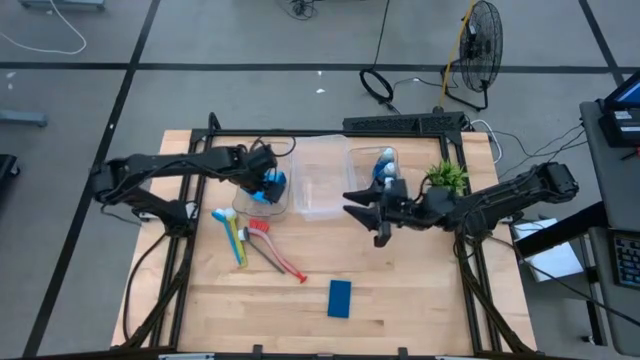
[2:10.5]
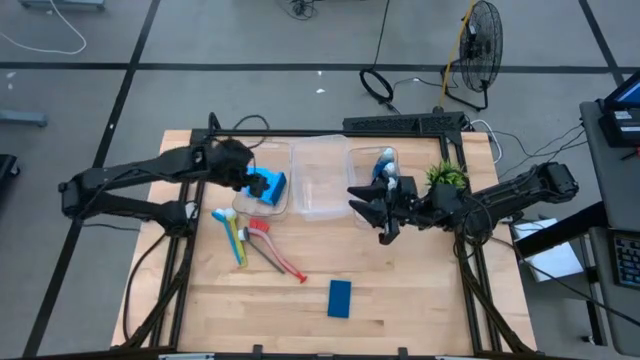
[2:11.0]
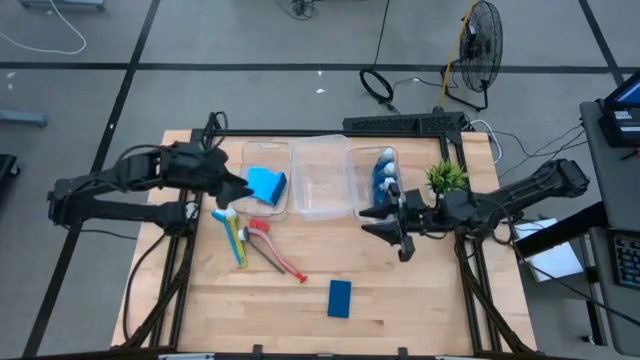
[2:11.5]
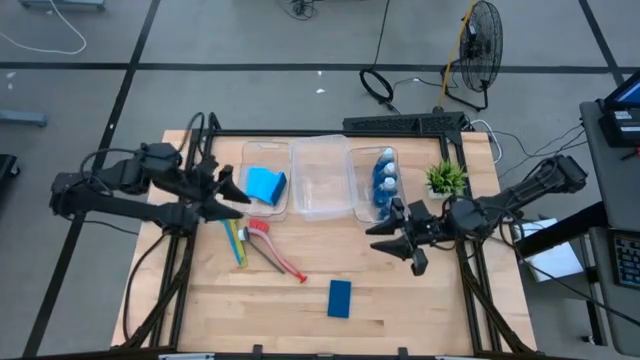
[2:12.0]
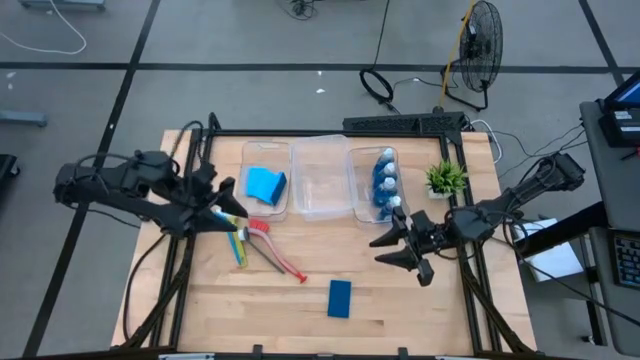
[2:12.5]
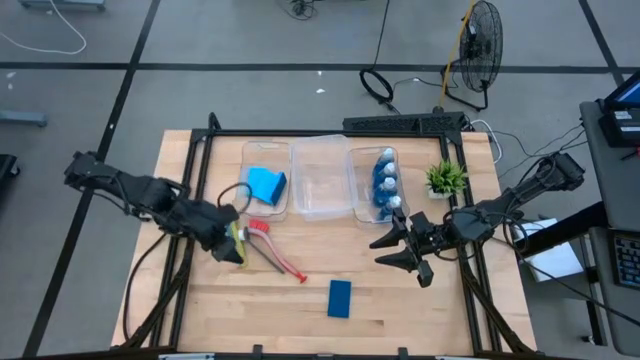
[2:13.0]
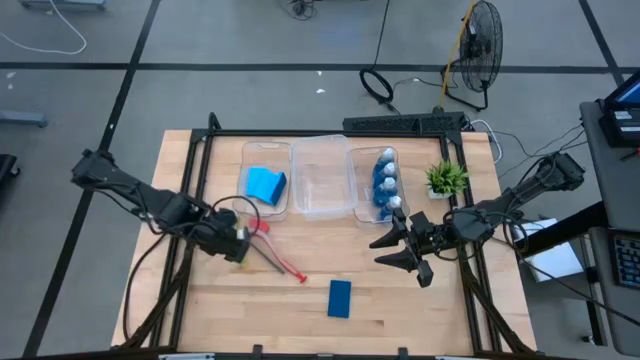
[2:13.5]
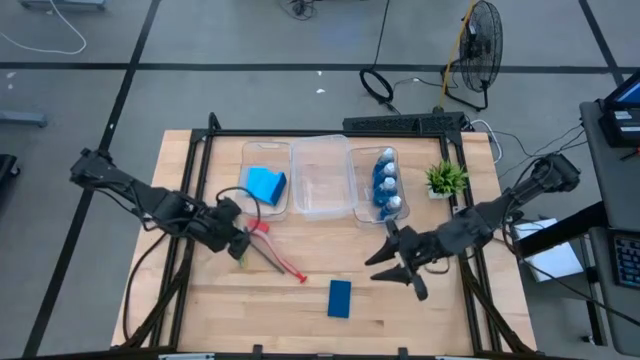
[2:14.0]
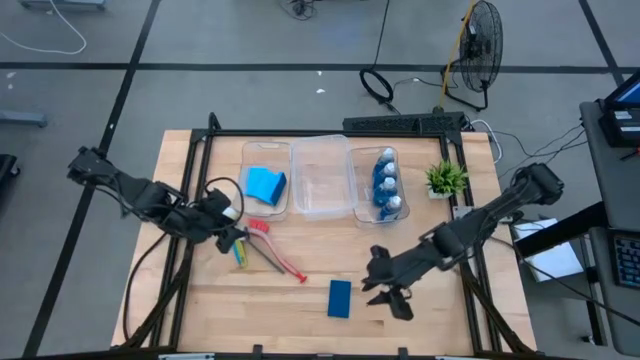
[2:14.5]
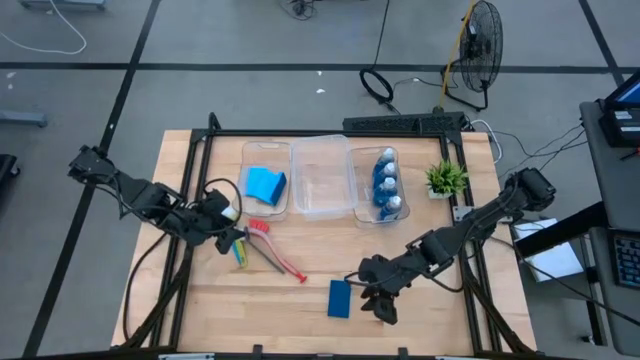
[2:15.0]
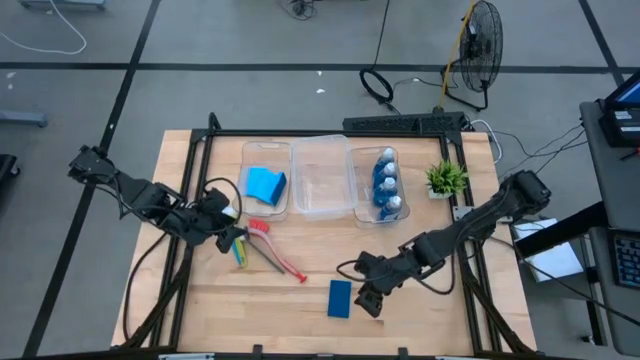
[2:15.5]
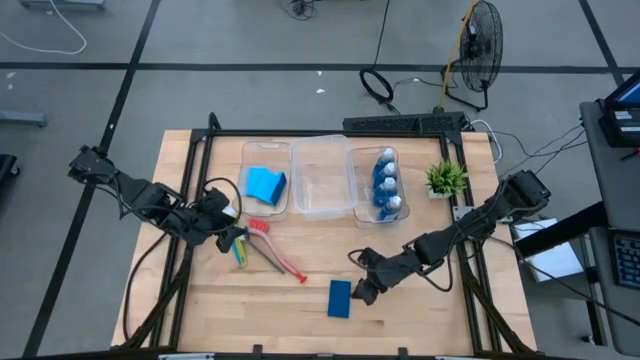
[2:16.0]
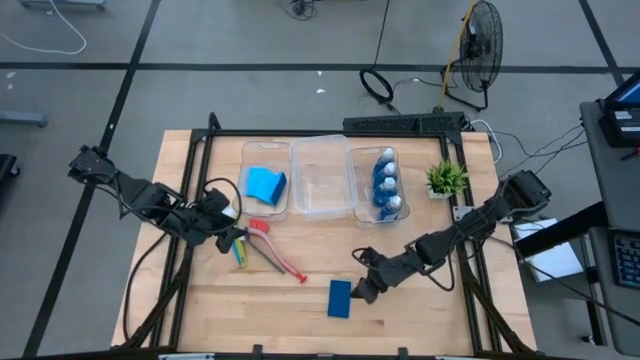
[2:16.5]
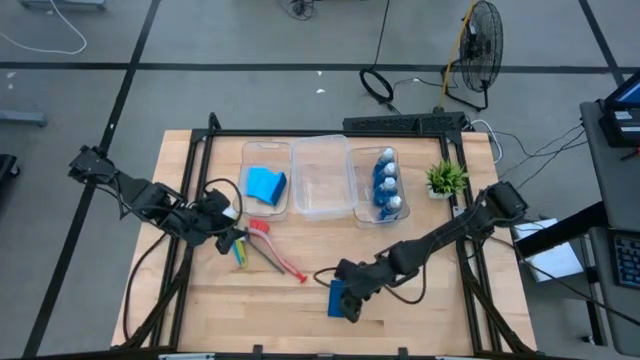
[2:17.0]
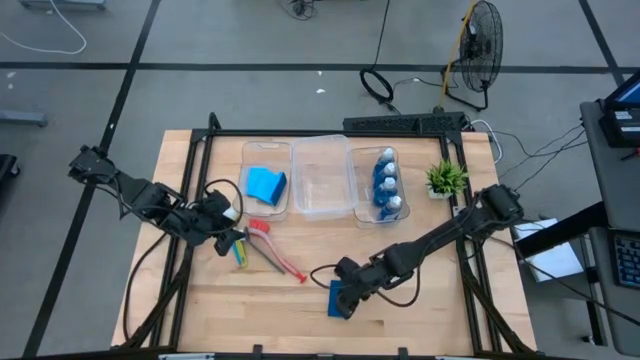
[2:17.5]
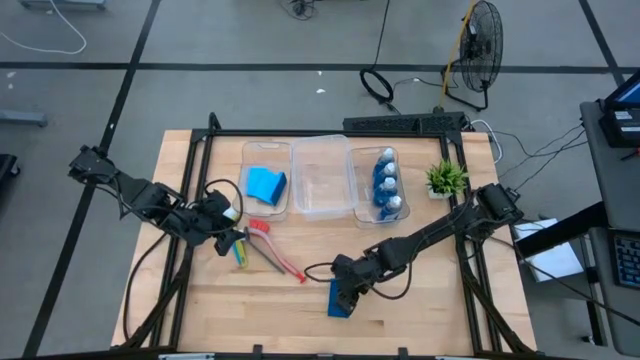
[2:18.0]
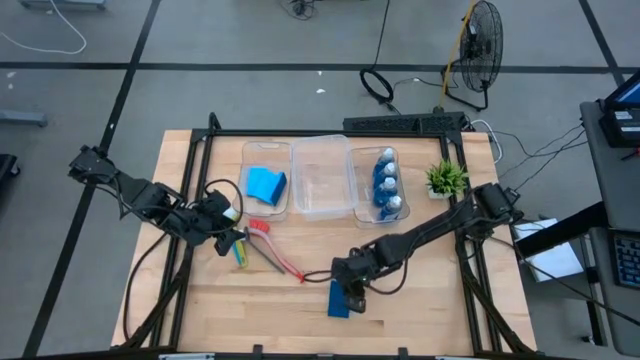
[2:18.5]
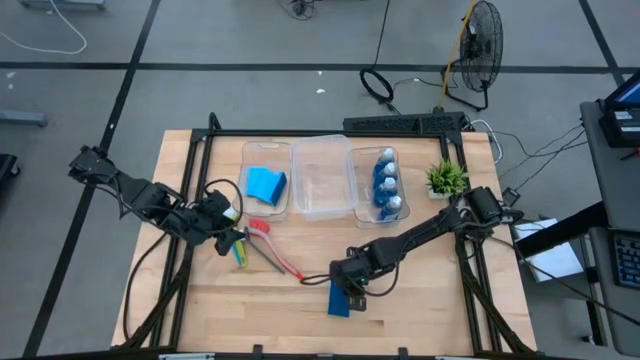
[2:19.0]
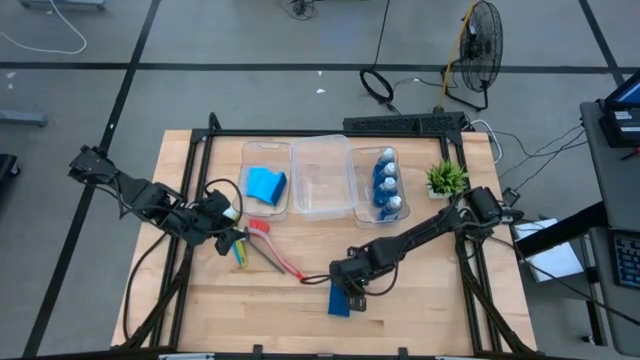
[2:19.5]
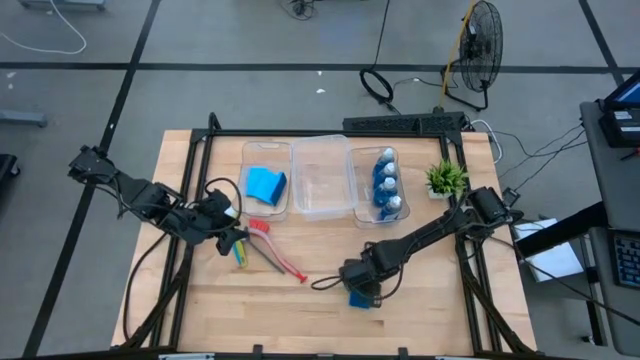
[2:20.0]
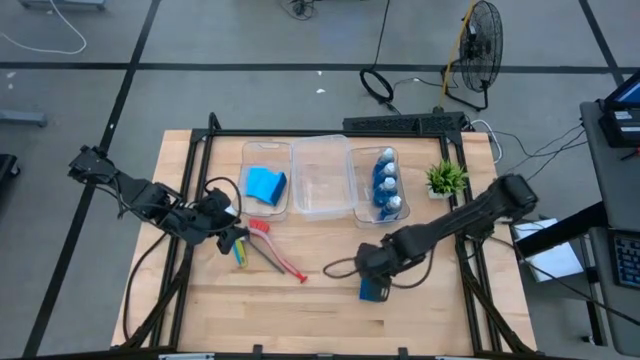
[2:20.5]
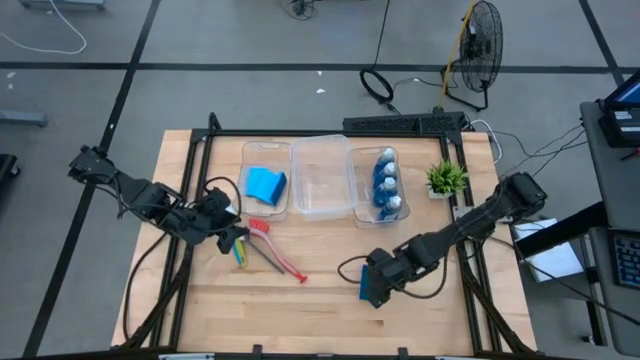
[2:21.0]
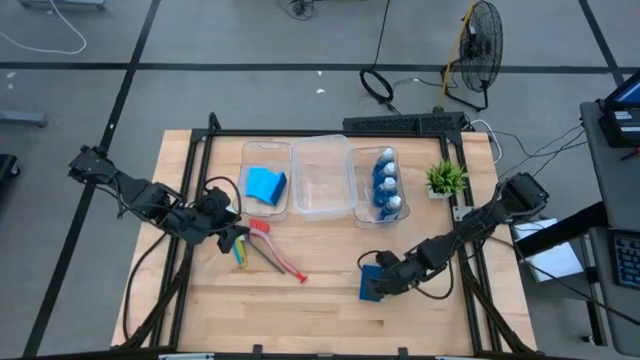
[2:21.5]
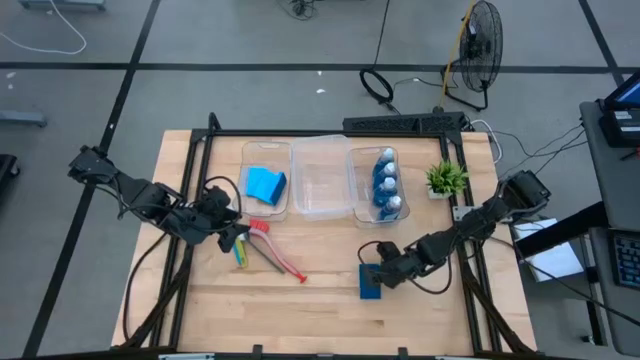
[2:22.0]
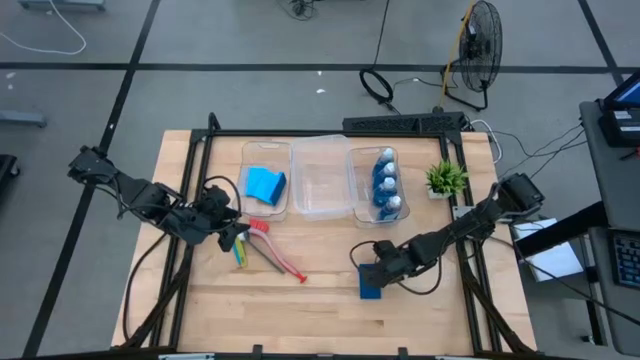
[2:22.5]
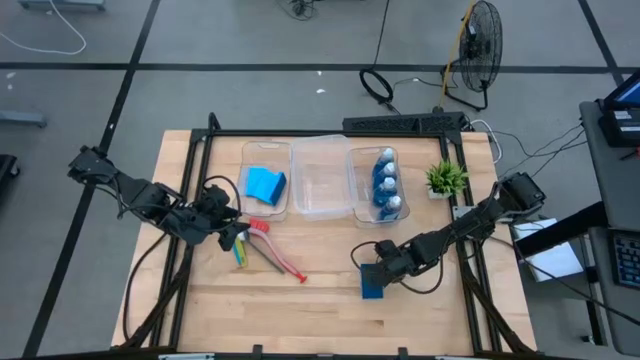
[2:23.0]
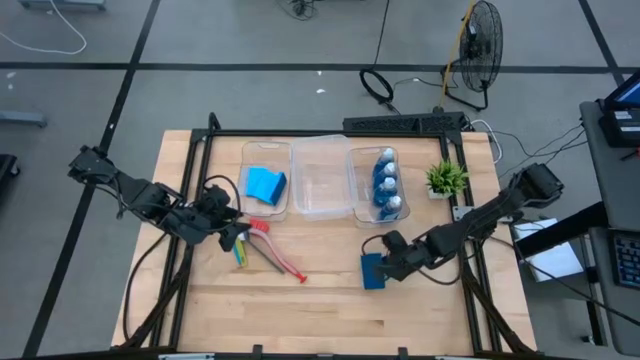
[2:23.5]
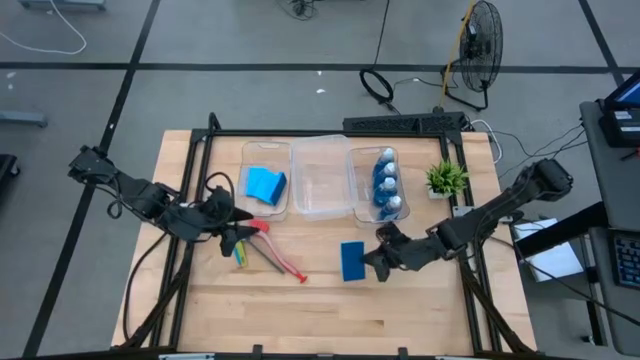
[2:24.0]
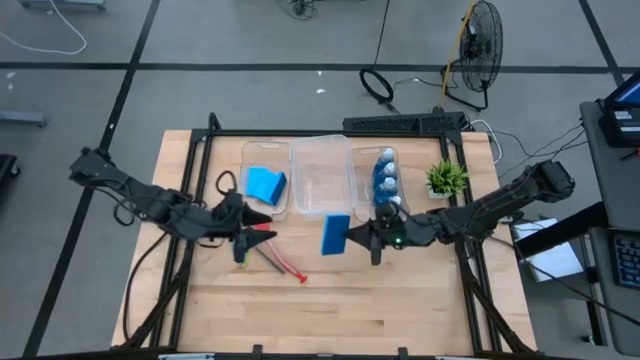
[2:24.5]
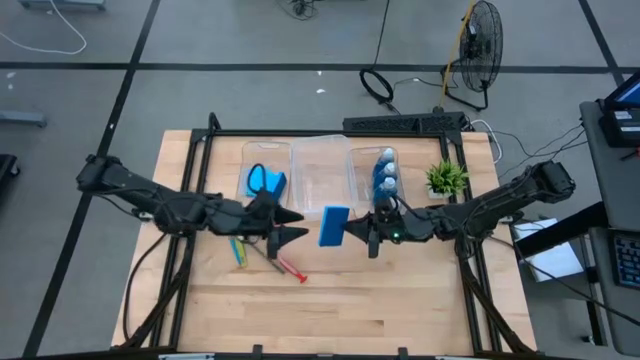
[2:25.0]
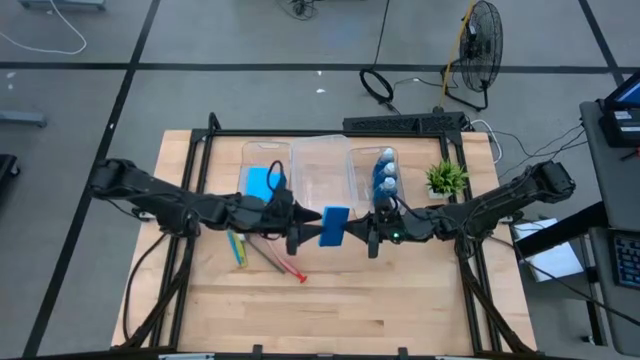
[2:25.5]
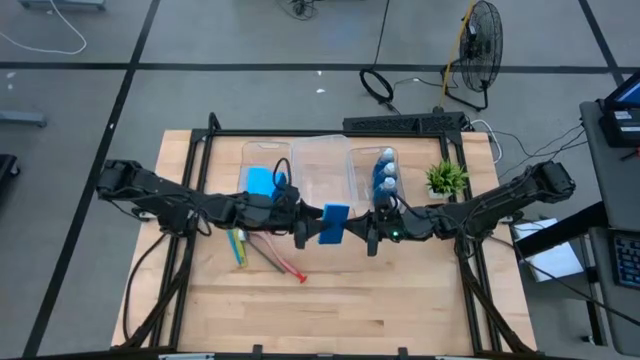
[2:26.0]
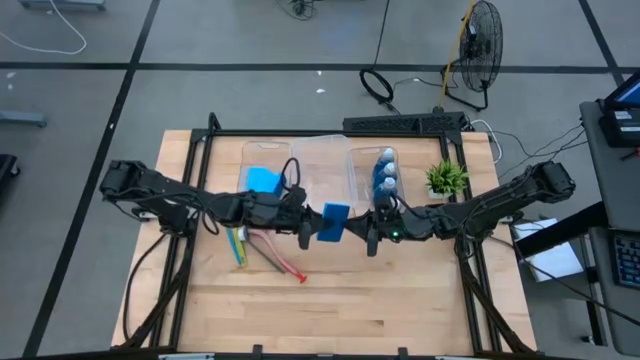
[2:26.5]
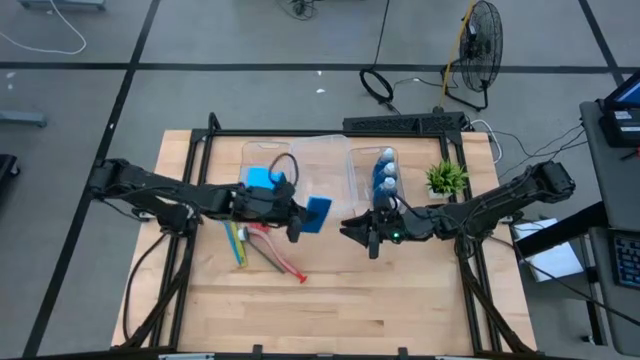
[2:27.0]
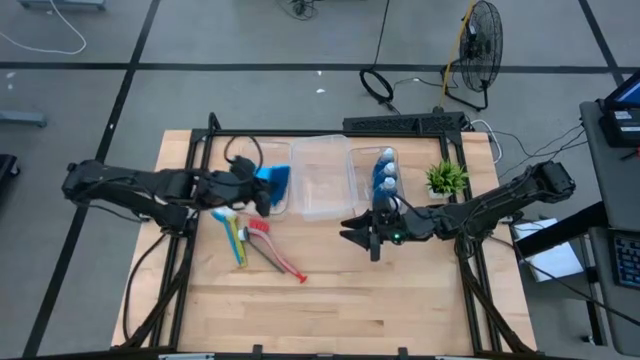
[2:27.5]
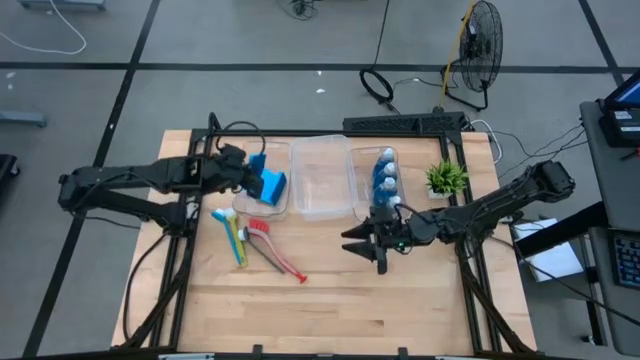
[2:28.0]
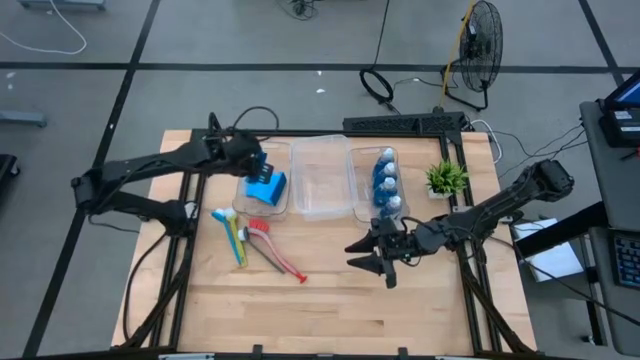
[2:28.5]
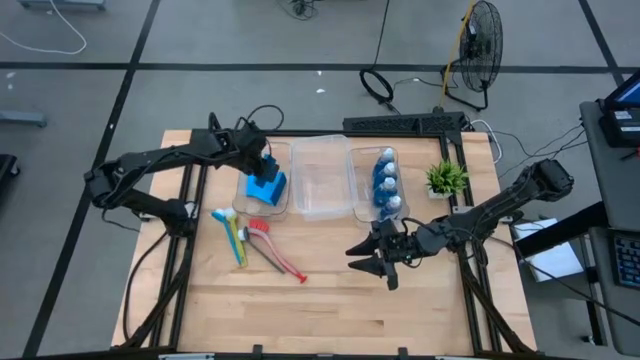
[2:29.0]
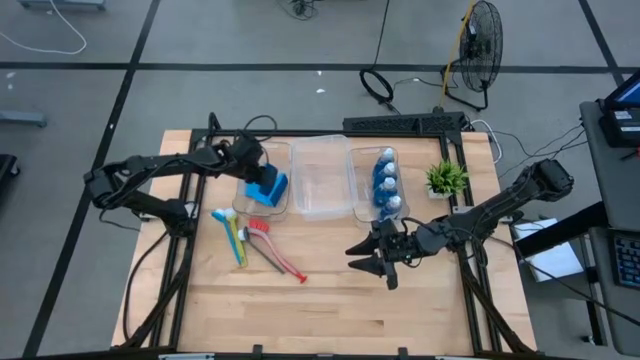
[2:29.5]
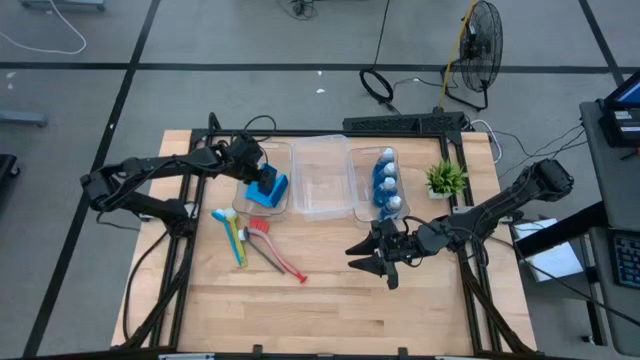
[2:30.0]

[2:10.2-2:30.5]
Task: Pick & Place Kitchen Sink Supplies
Put the blue sponge into the left transparent bin
